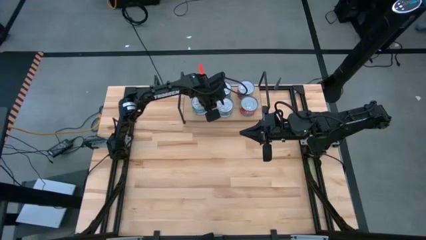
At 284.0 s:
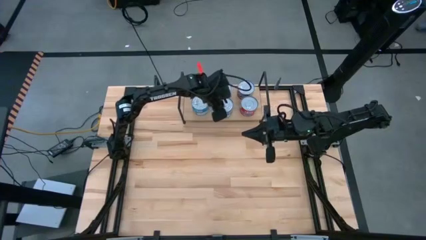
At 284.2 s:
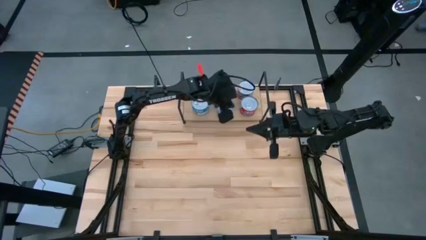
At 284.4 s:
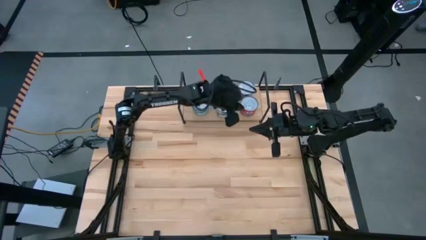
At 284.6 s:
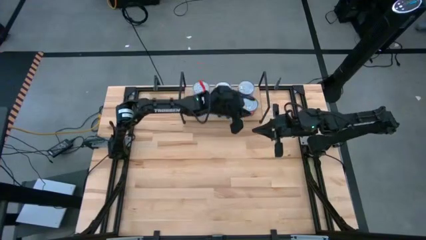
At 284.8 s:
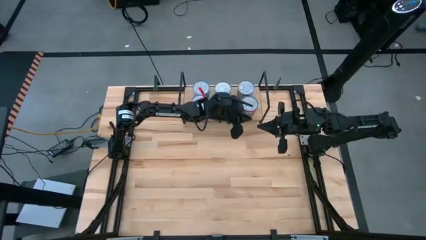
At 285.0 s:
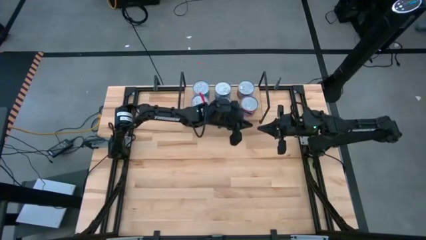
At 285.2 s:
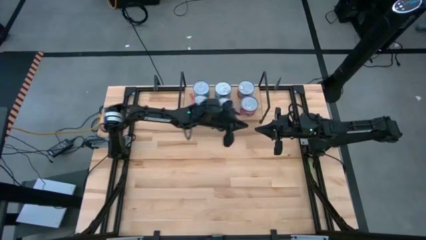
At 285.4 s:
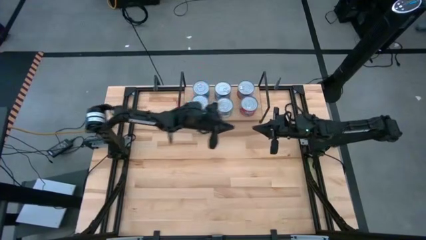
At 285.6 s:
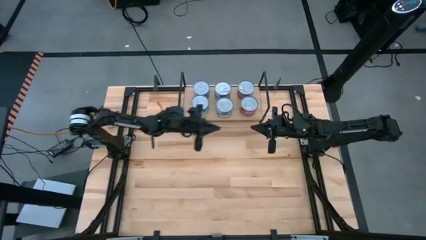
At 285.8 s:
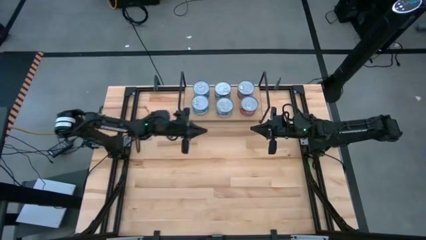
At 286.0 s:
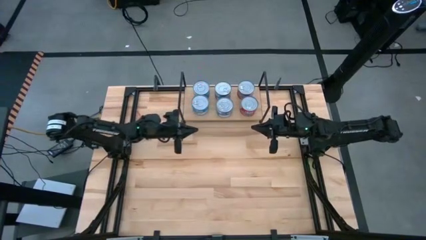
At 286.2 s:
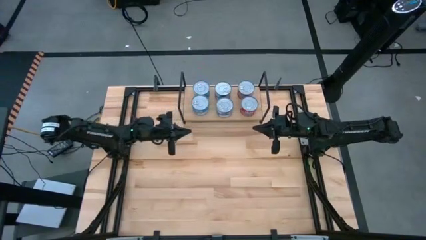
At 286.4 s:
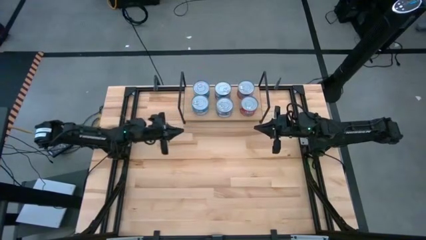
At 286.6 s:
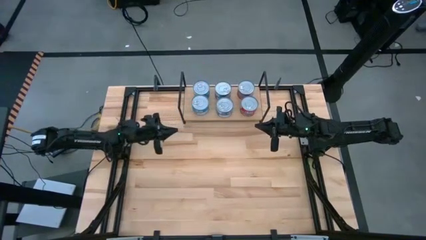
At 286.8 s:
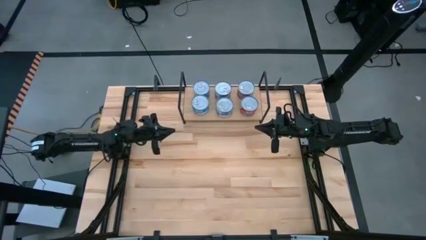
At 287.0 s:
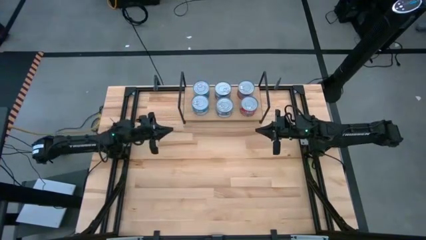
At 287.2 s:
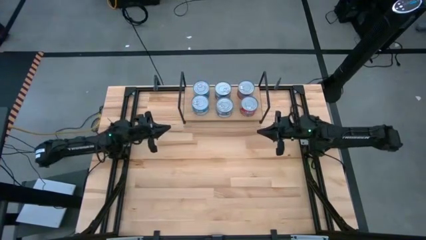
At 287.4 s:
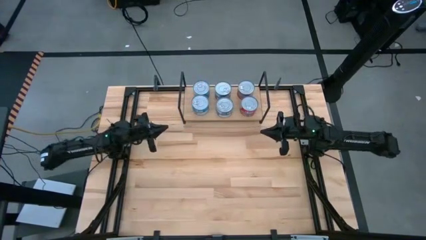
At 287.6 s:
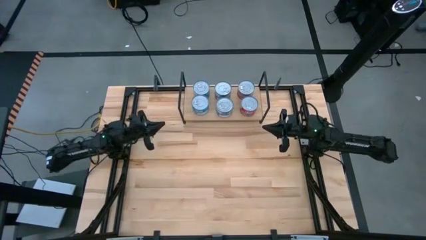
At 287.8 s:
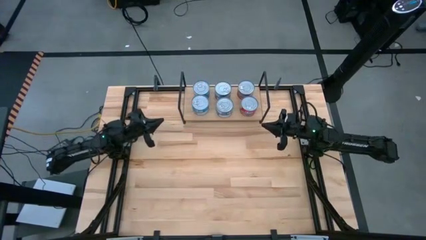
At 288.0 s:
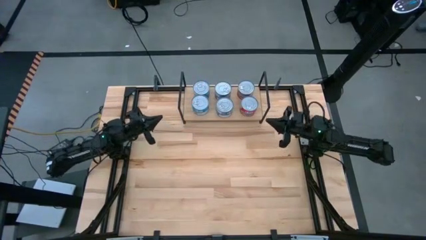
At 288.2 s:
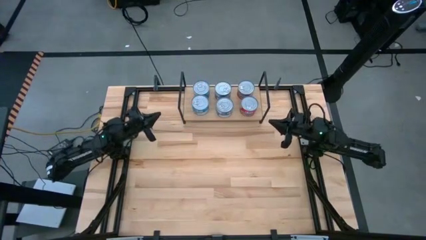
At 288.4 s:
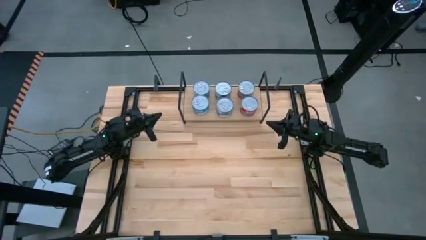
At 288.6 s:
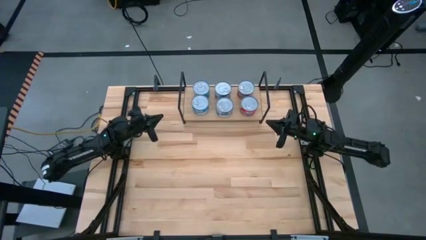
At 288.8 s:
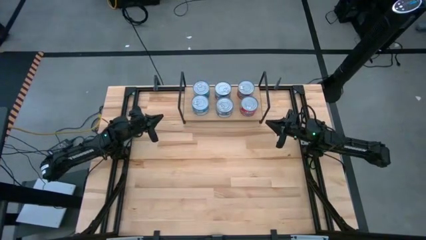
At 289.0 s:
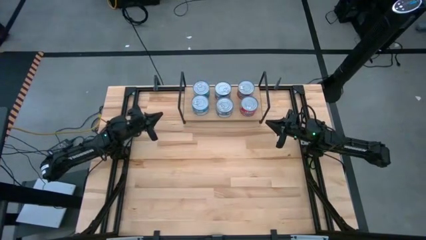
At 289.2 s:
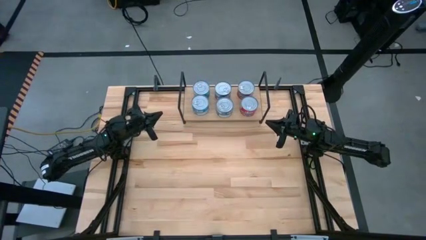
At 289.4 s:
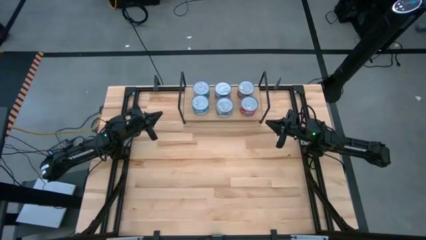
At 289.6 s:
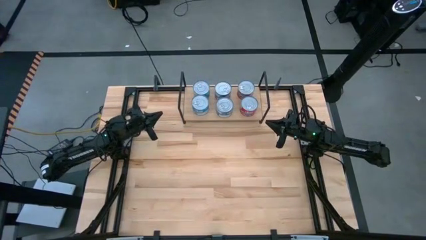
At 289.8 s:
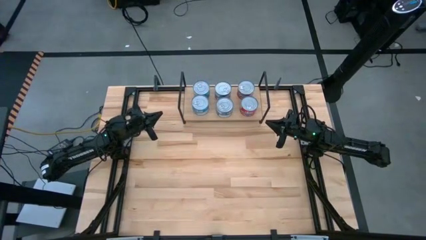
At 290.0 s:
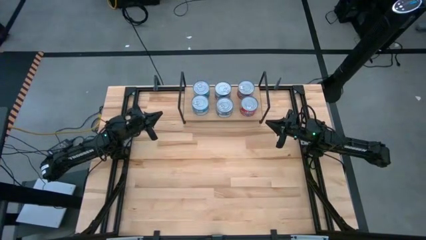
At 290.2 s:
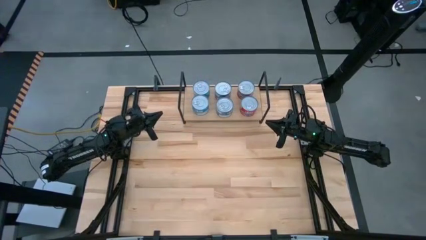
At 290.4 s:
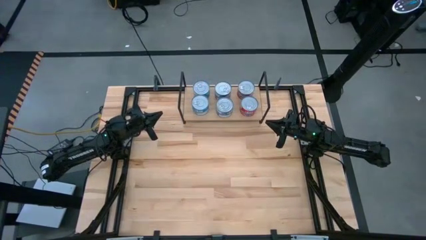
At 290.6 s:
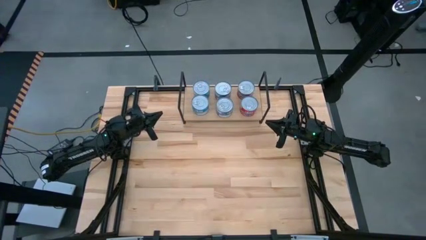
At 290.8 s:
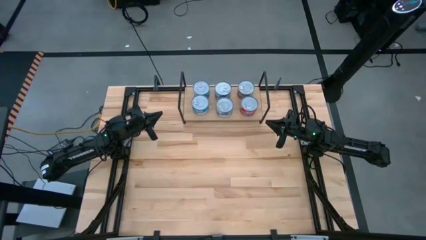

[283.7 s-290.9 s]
Task: Stack canned seafood by type on shelf
Return to Home Position

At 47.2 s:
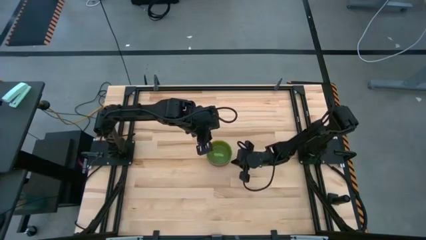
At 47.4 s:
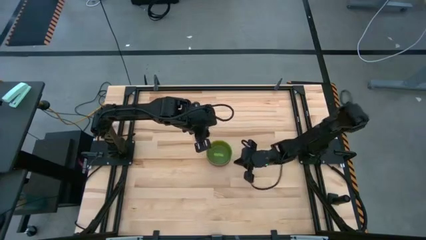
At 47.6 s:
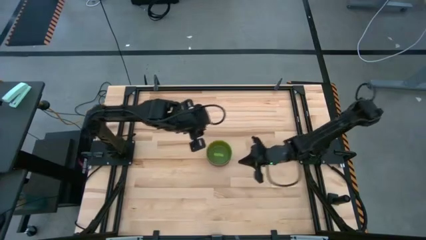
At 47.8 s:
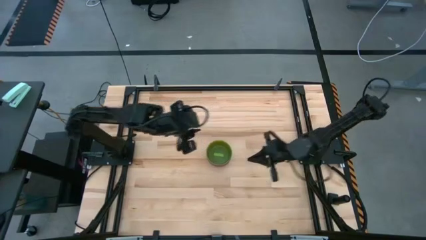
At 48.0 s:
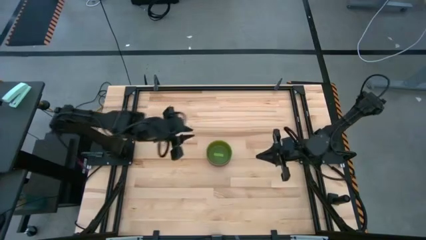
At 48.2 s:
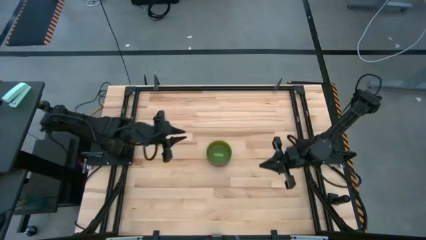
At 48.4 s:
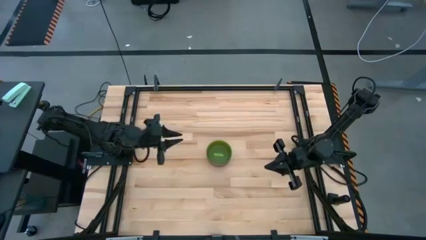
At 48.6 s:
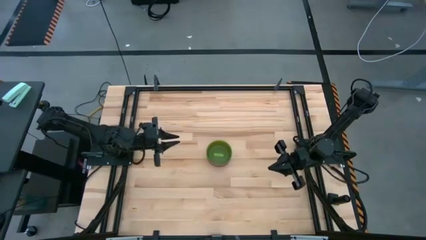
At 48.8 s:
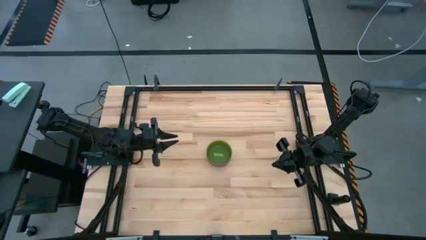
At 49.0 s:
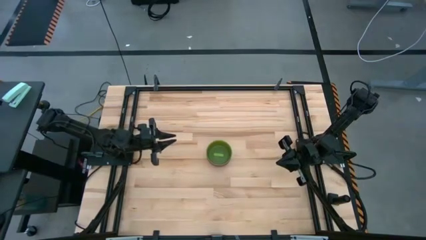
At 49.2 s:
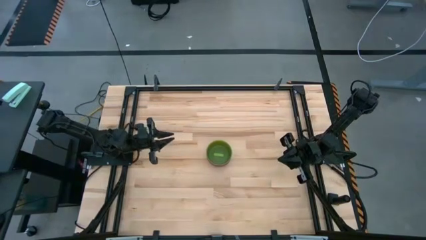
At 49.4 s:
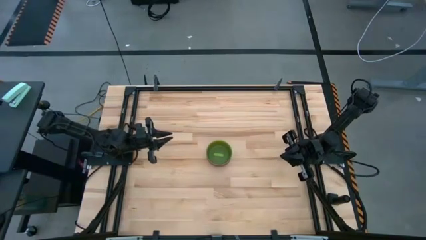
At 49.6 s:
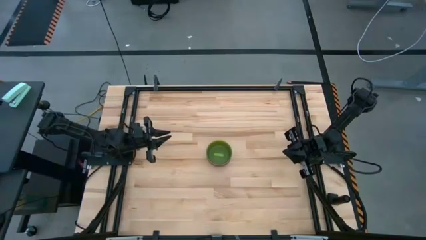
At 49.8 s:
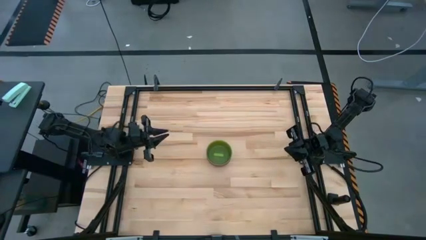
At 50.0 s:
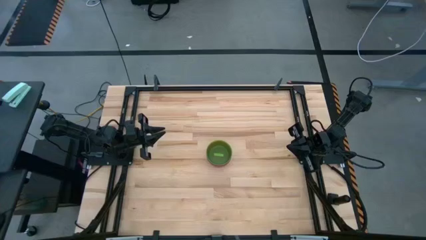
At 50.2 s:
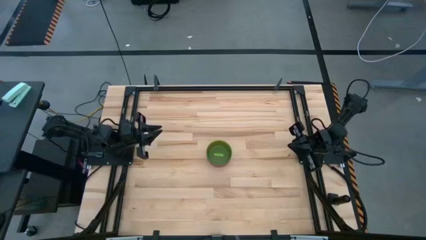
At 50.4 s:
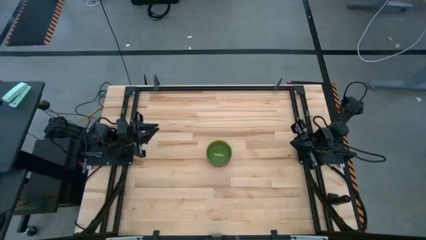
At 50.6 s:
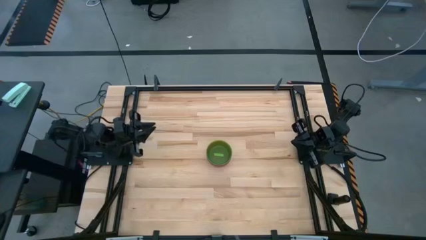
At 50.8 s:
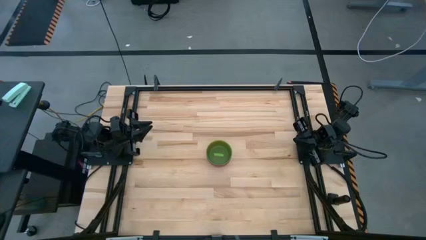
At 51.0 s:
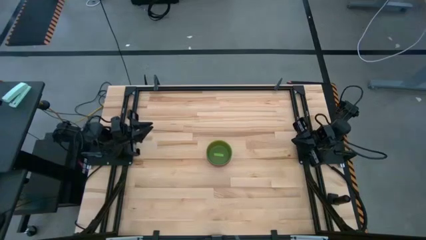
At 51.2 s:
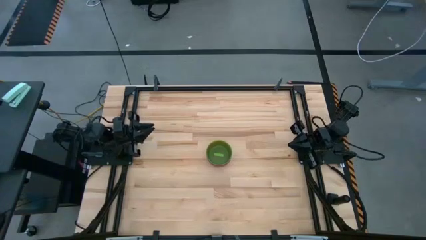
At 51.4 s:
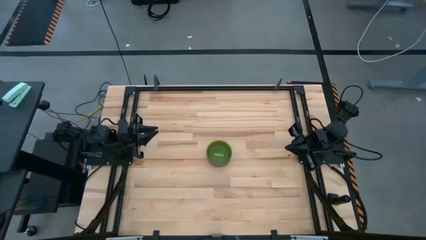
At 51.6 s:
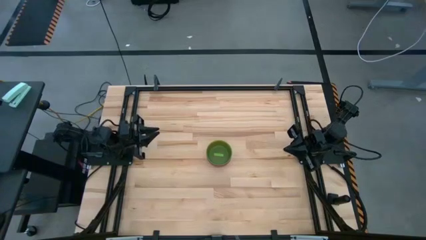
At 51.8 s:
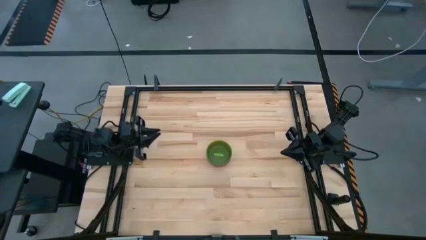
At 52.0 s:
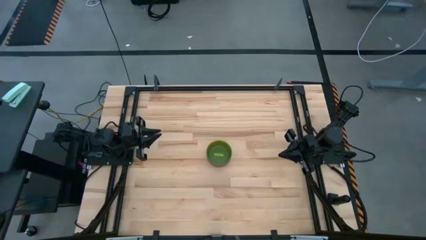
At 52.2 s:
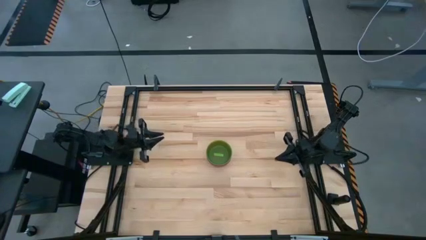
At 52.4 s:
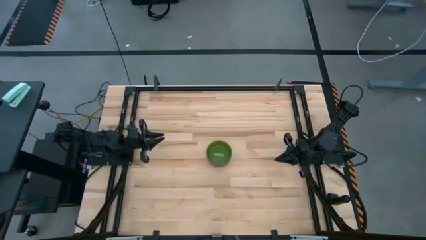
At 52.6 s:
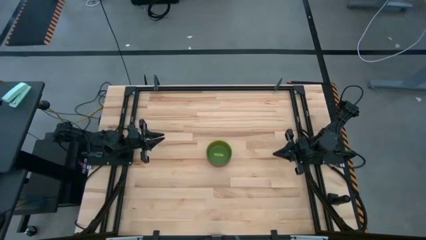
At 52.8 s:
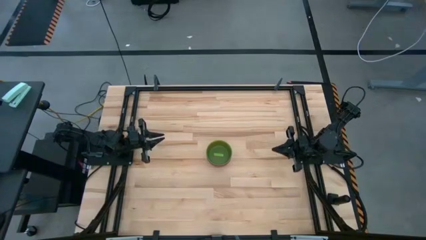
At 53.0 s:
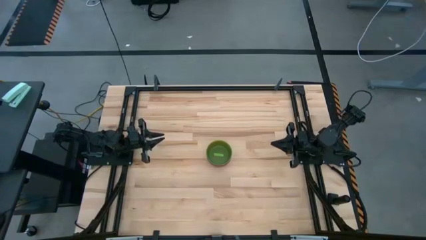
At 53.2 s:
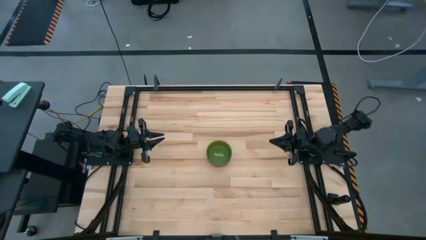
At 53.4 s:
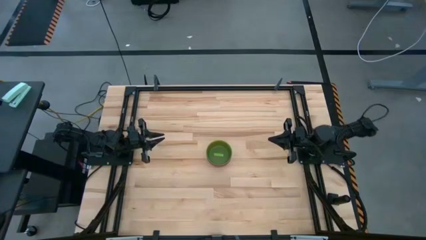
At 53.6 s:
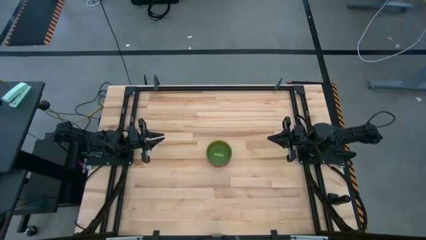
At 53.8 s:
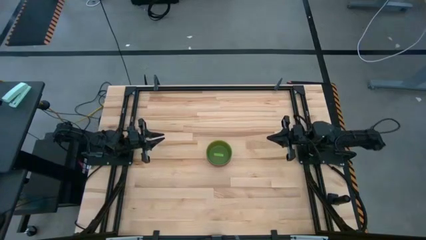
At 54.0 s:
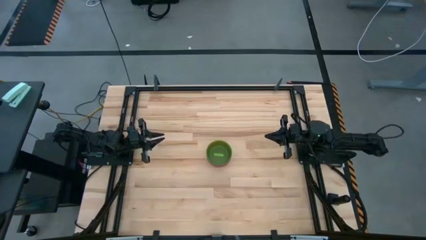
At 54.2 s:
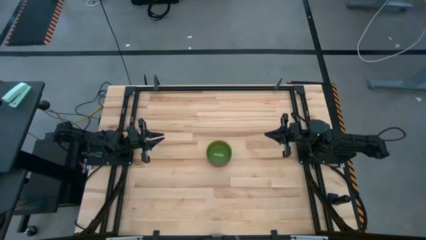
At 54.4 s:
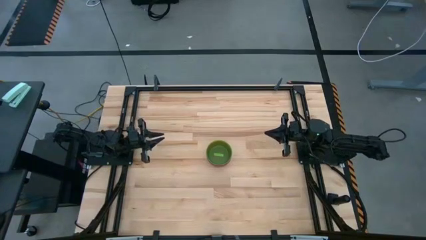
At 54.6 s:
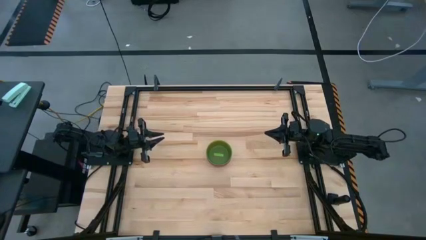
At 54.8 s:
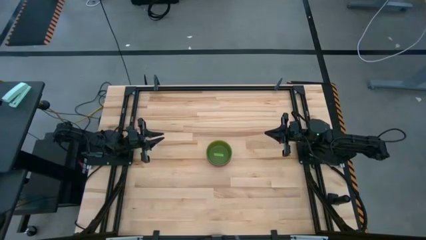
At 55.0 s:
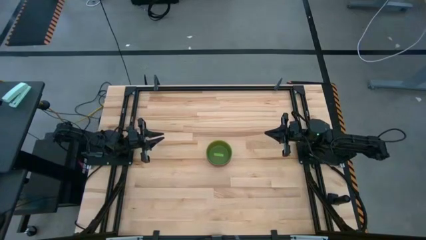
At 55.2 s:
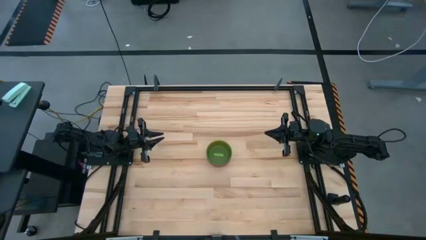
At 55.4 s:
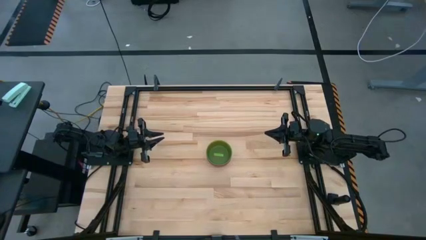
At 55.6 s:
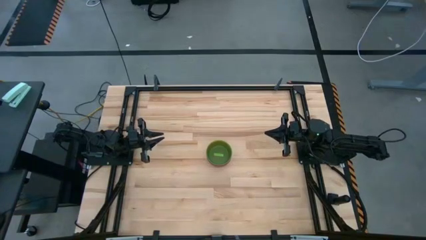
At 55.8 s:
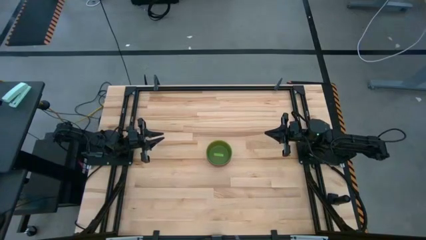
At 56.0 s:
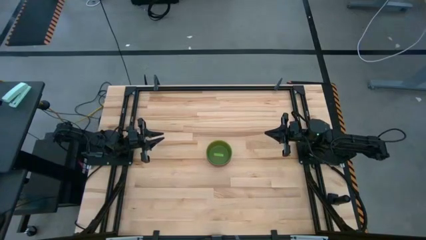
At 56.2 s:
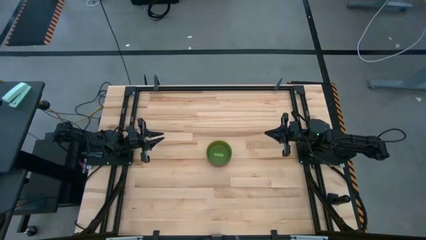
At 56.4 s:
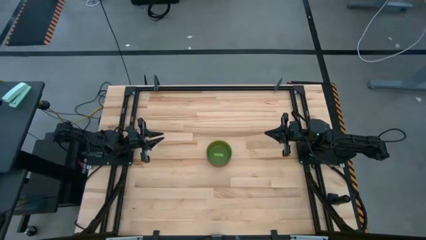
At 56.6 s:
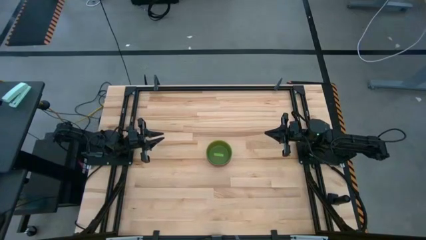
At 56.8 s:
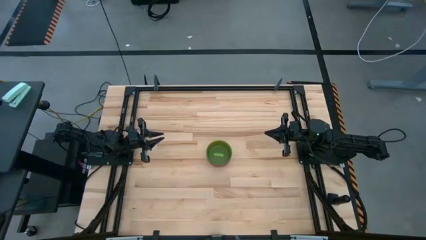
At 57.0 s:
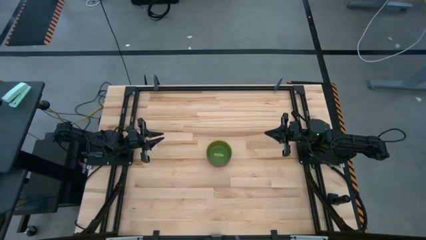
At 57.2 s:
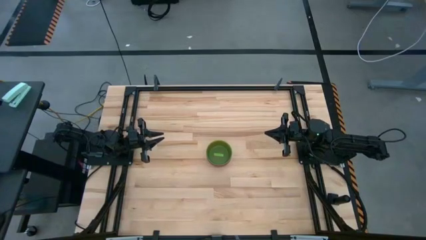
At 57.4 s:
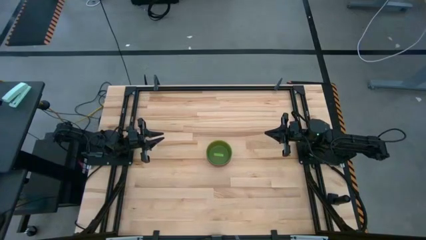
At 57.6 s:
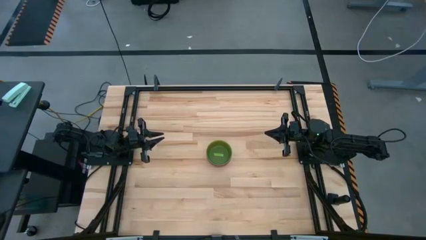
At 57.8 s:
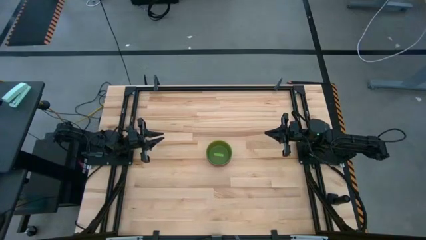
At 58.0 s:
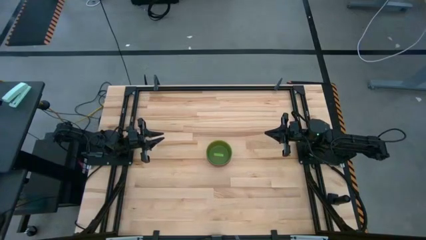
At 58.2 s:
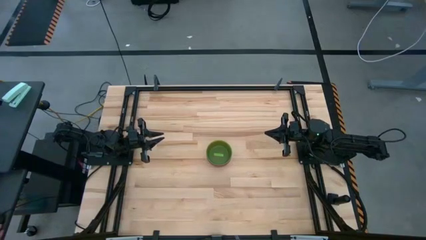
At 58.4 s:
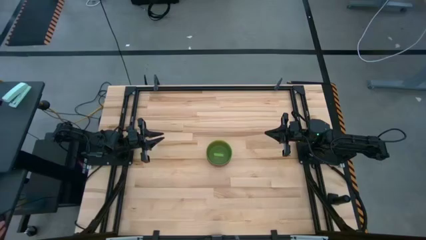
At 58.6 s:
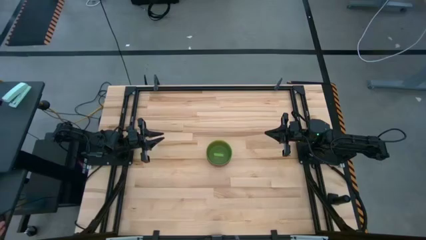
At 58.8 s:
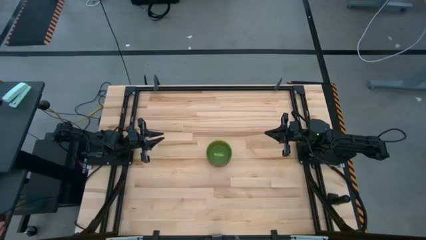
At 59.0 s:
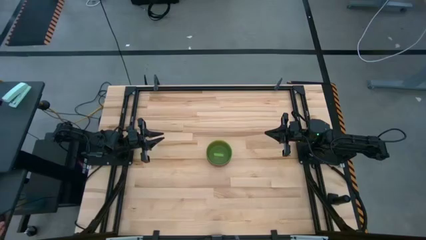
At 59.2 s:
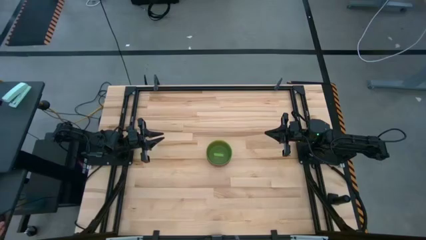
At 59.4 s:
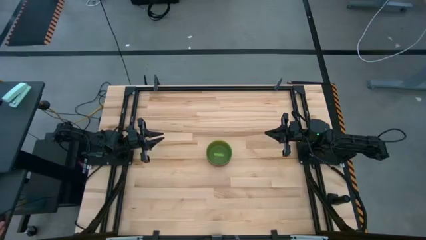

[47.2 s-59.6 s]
Task: Nest bowls inside each other
Return to Home Position
